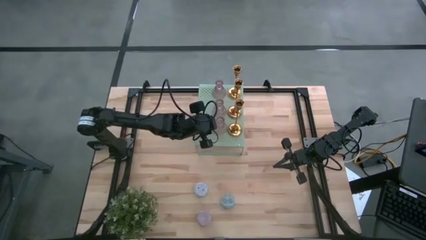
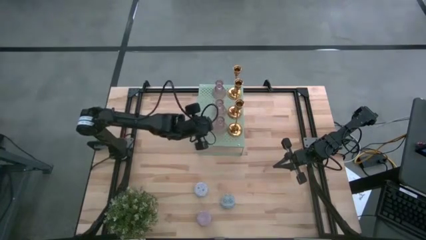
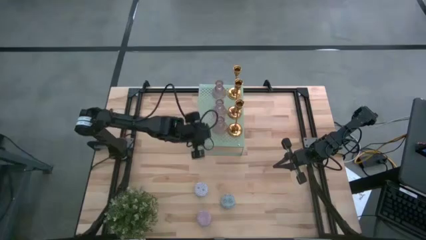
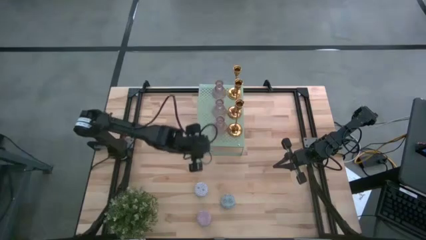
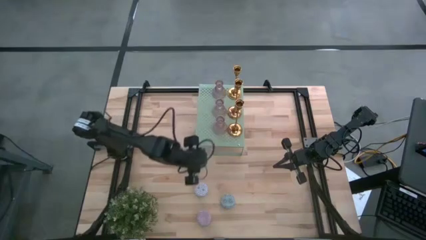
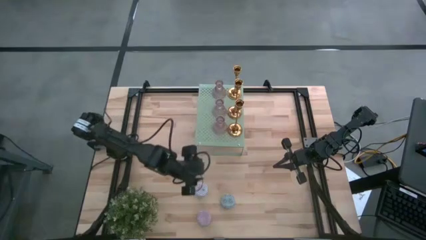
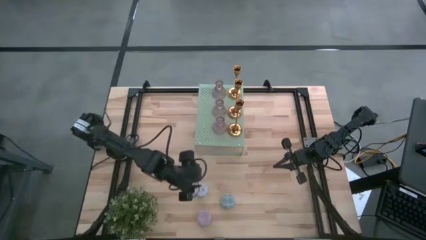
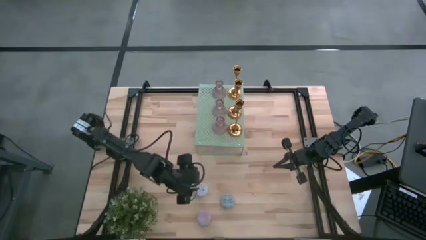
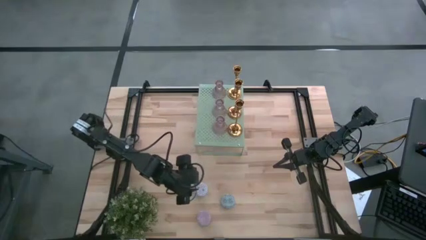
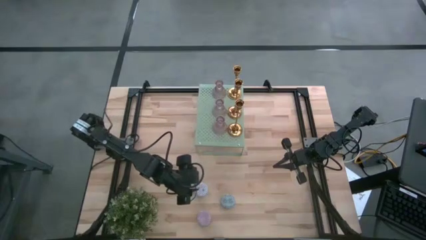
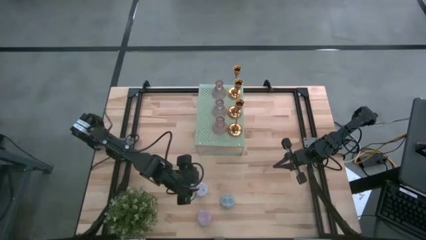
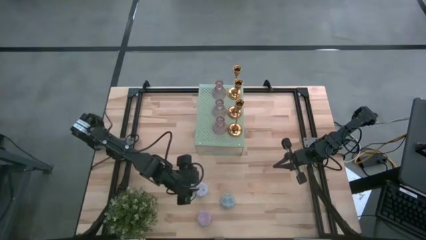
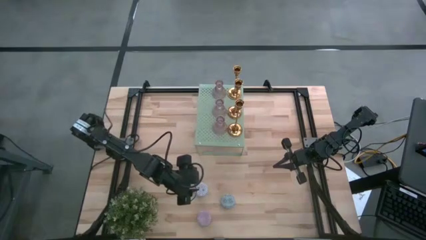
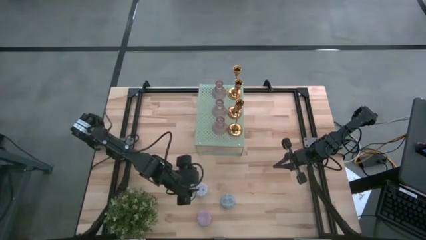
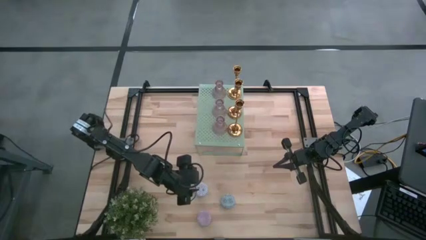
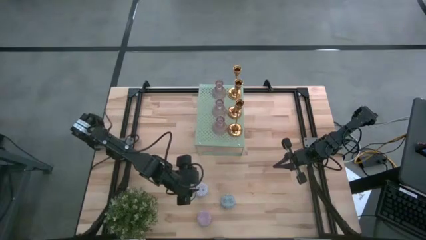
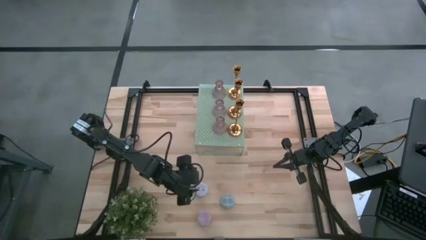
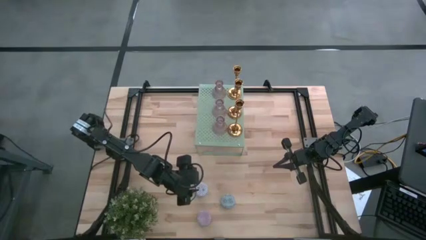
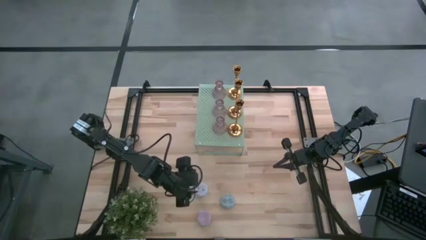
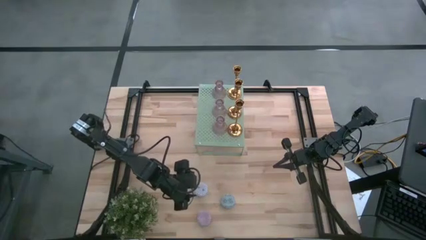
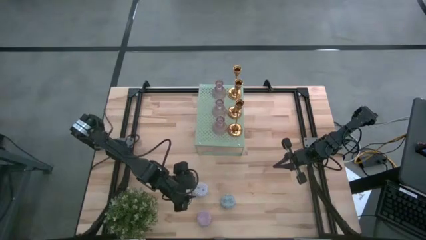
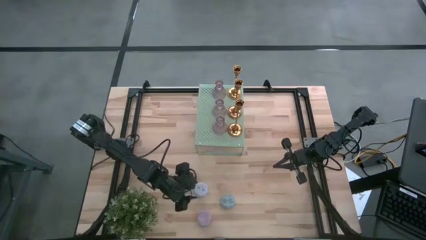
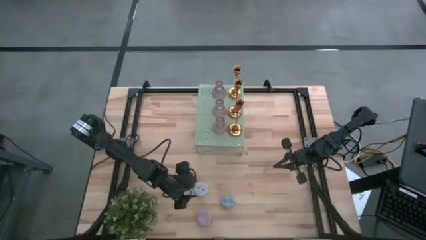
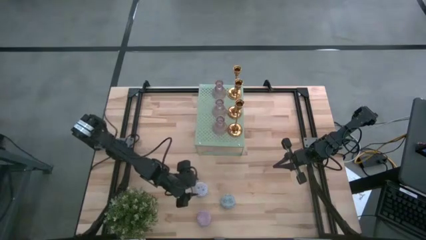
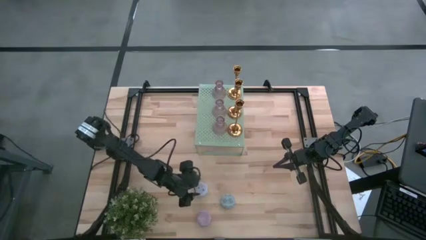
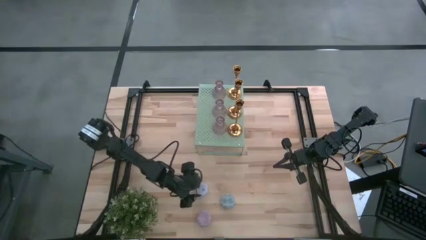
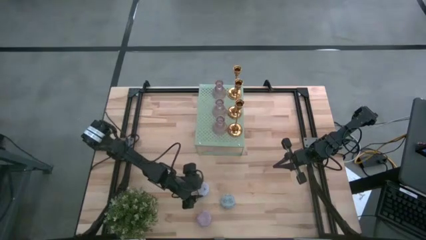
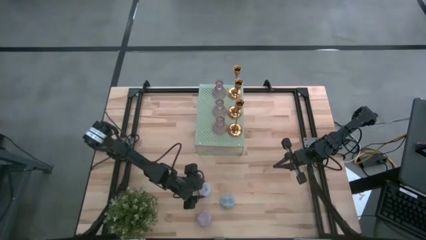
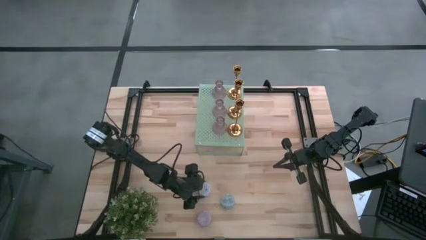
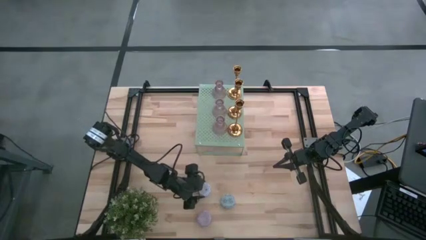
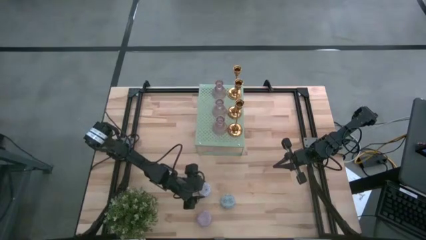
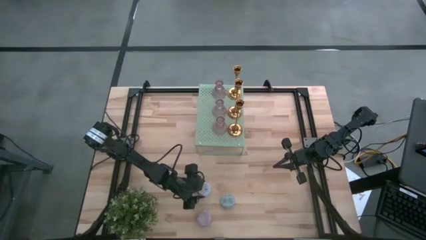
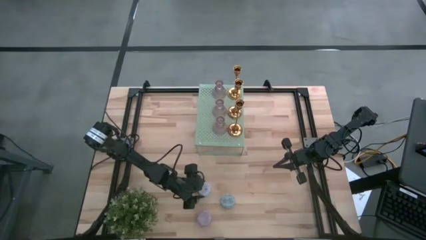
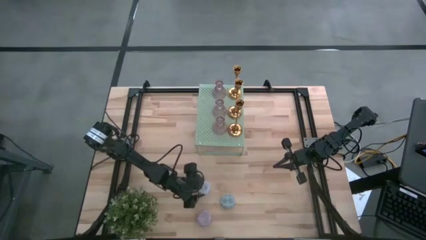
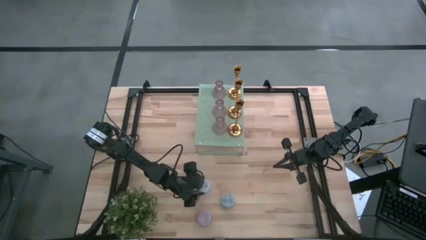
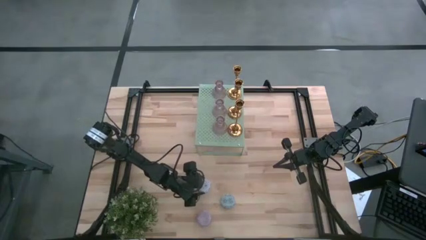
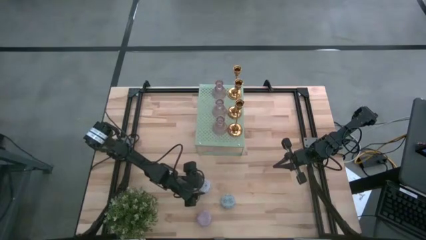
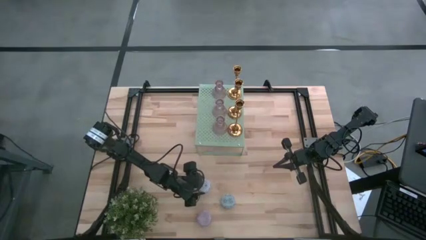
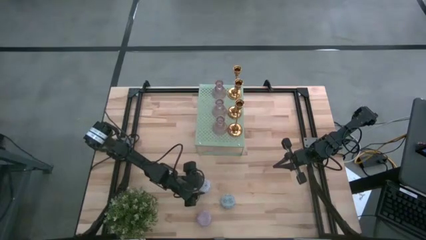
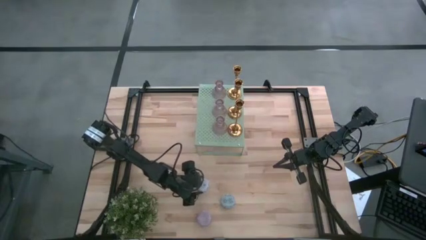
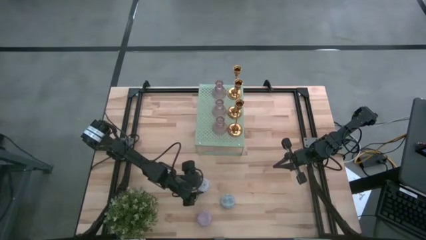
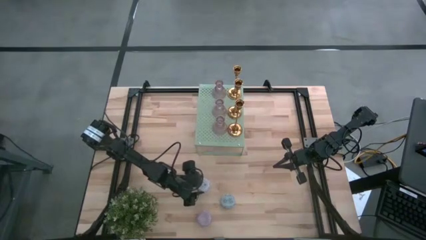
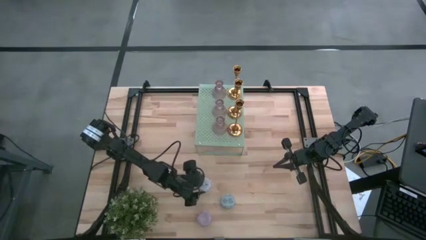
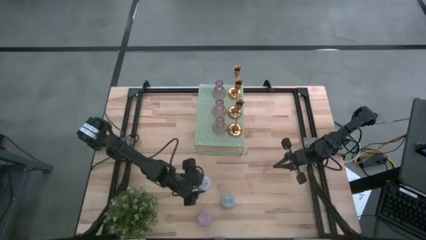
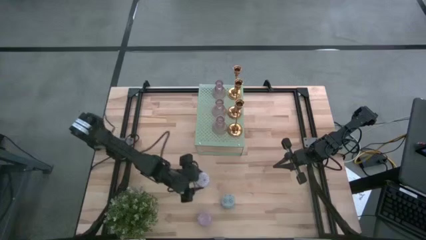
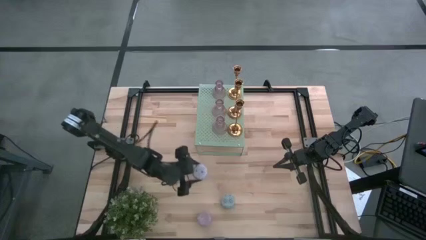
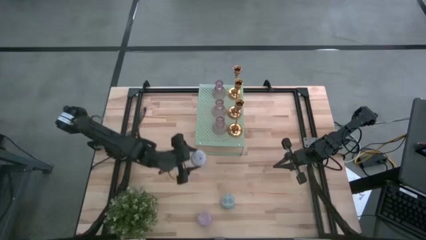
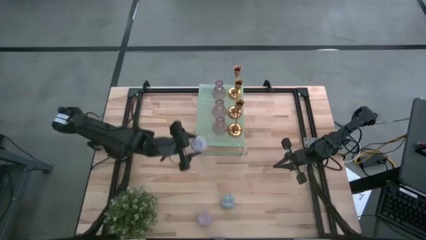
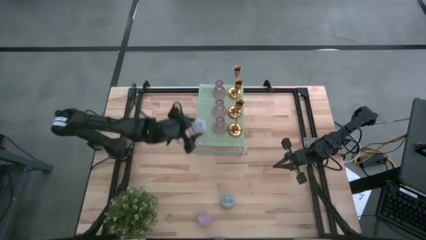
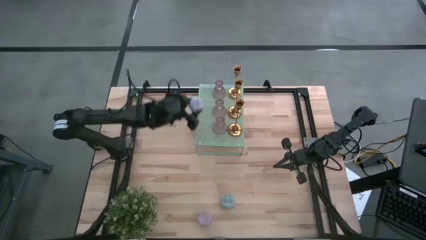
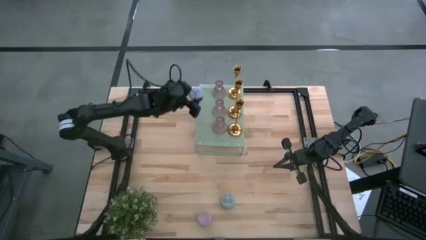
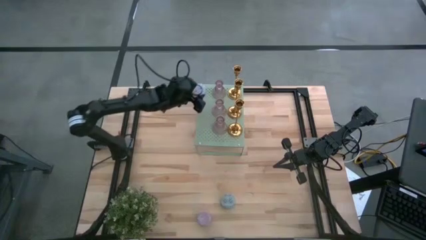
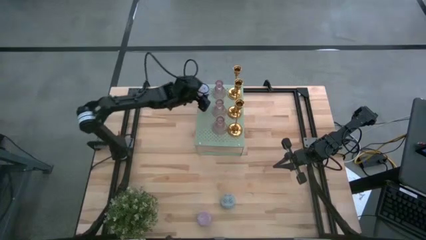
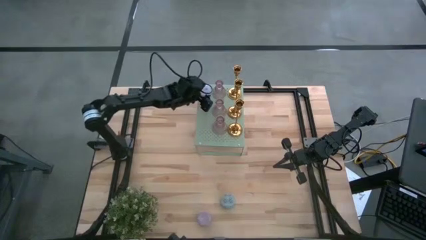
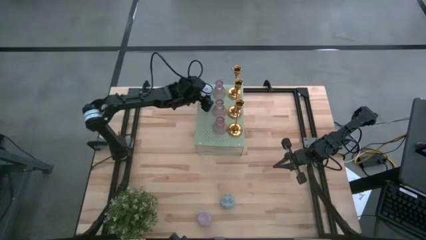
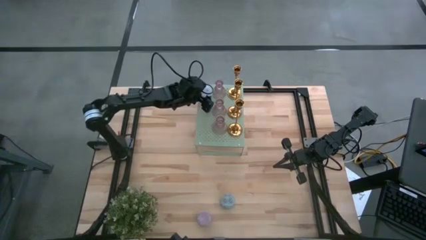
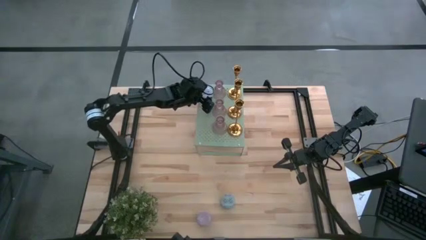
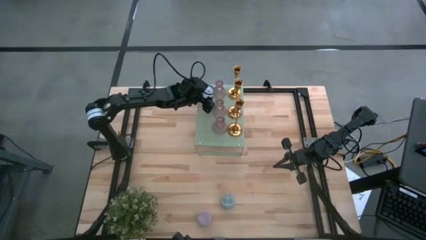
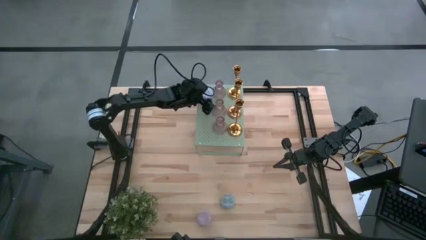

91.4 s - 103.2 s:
Task: Pick & Place candle stick holders
Put the white scented candle on the shelf
